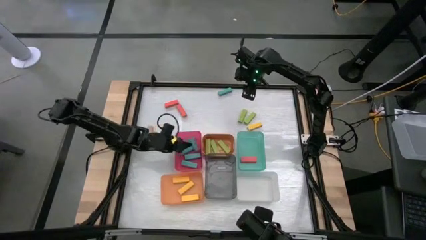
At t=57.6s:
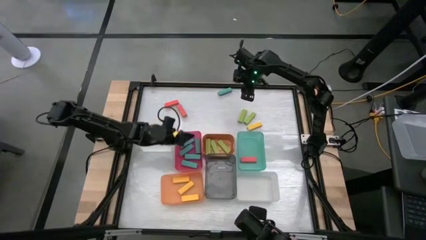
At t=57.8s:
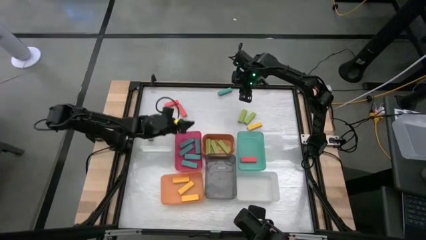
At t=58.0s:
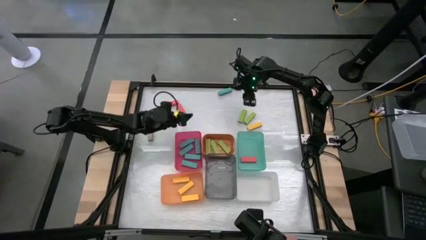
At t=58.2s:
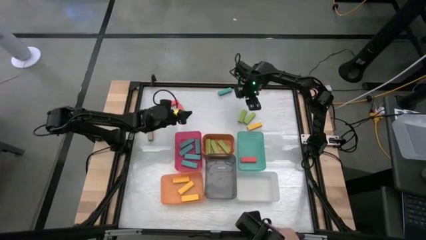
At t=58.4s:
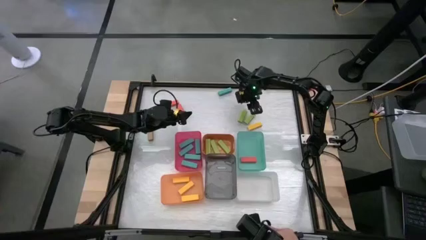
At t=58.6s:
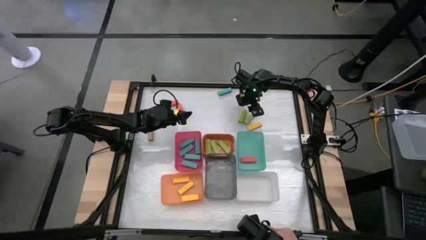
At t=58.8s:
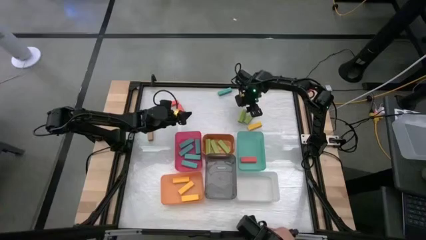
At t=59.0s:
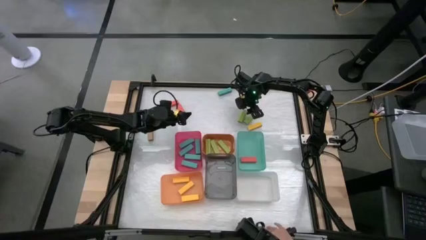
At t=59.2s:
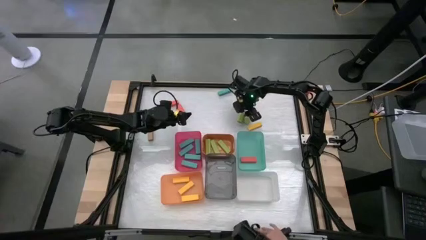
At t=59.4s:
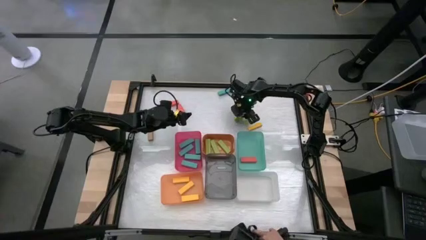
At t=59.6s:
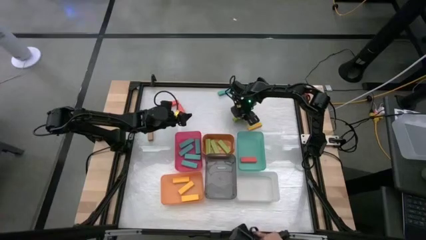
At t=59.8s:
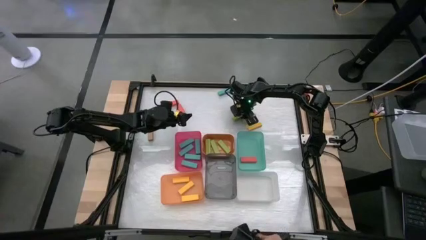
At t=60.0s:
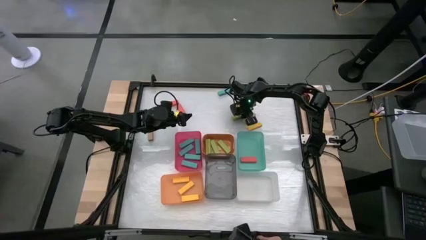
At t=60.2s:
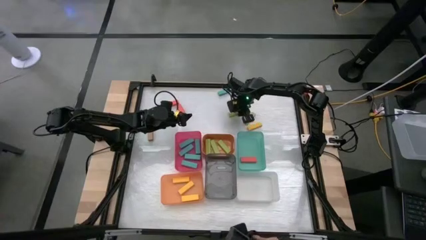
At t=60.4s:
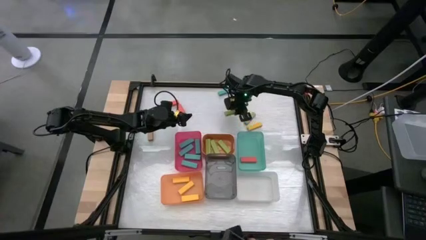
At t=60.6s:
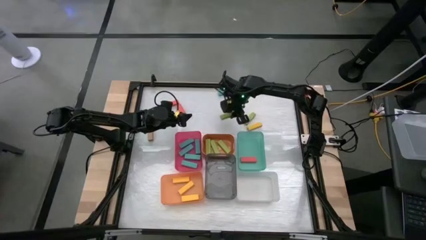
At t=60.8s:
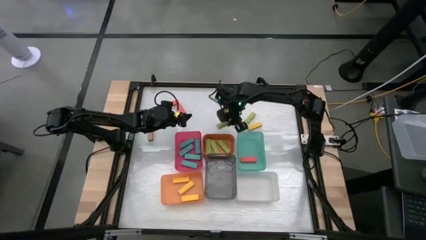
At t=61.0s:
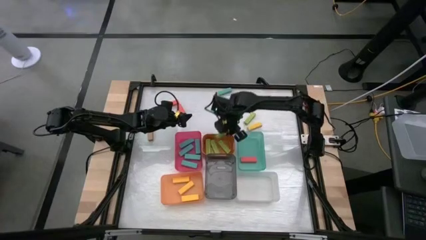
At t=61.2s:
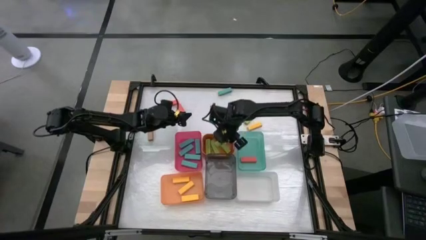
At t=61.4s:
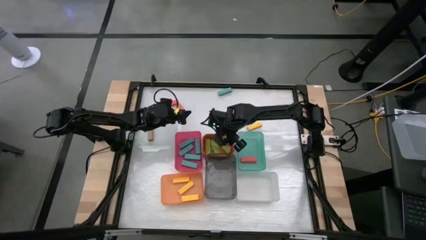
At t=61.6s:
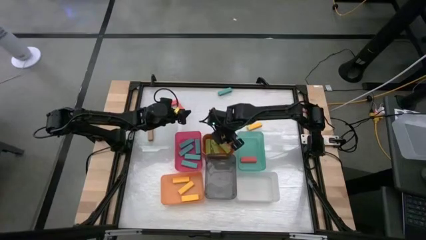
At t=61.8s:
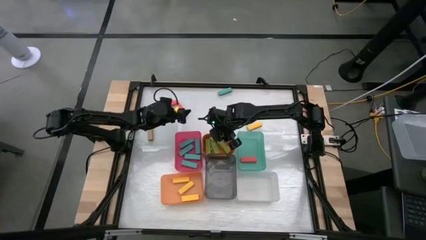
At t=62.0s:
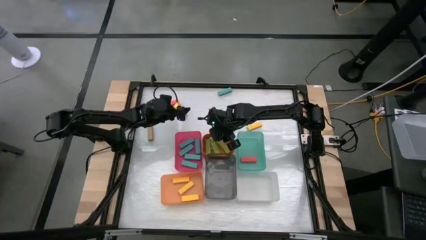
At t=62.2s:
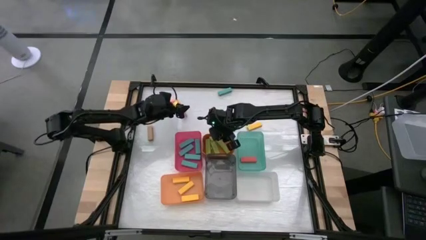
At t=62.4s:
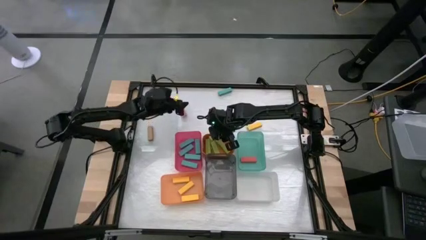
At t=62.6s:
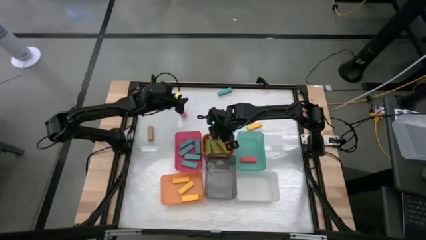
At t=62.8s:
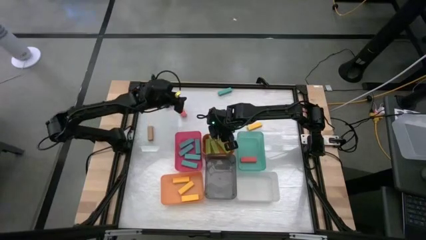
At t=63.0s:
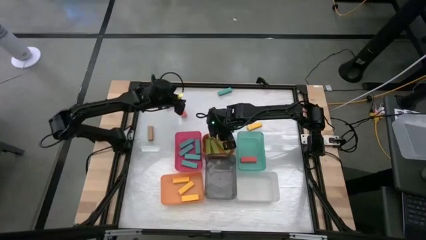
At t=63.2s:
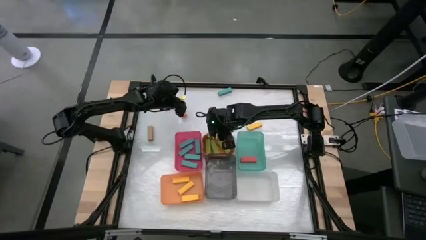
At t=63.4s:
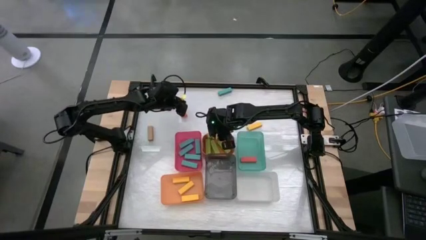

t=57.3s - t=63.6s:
Task: Sort blocks
Put the left green block into the top orange bin

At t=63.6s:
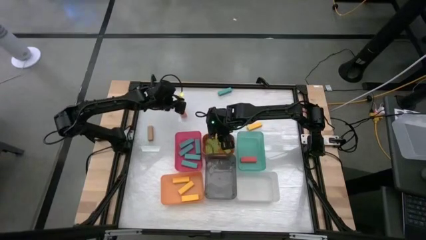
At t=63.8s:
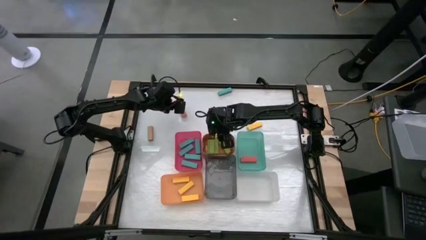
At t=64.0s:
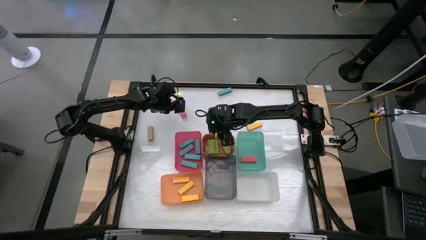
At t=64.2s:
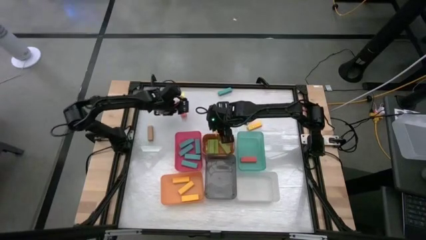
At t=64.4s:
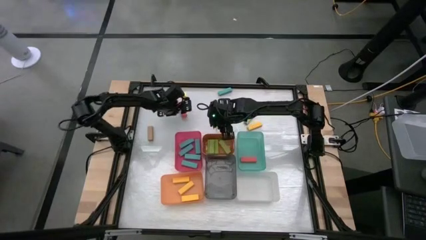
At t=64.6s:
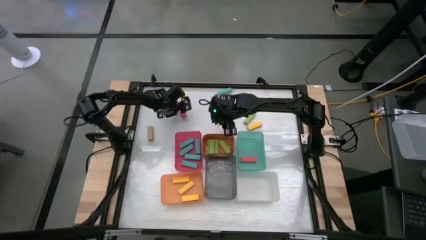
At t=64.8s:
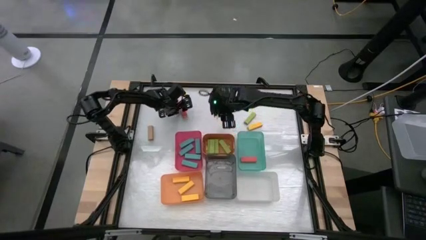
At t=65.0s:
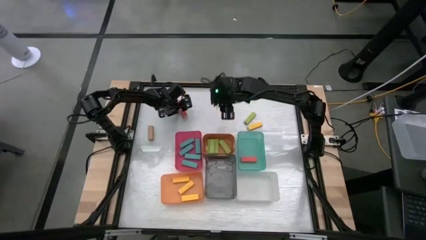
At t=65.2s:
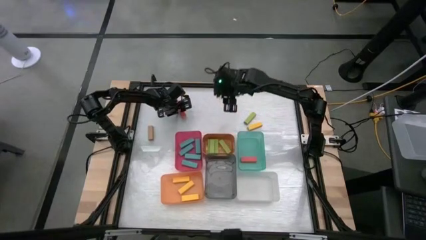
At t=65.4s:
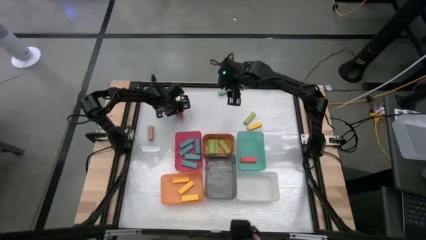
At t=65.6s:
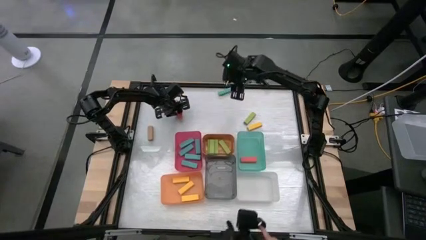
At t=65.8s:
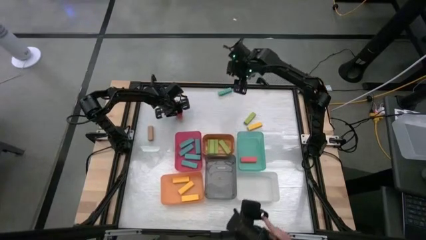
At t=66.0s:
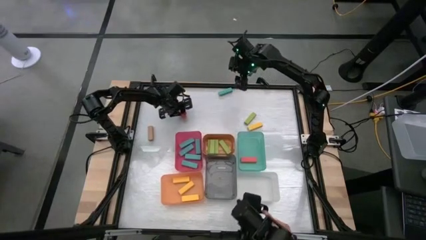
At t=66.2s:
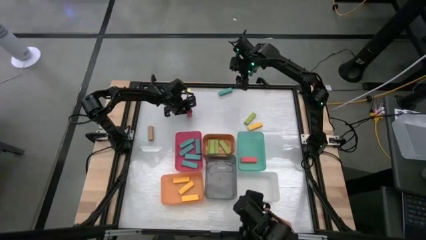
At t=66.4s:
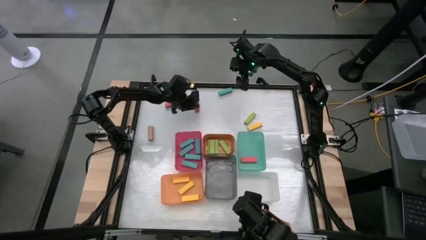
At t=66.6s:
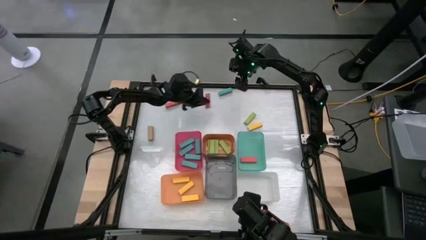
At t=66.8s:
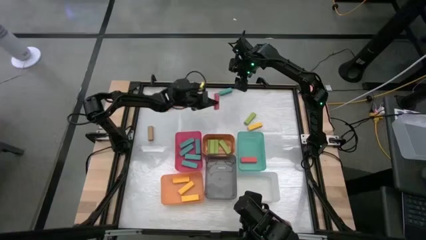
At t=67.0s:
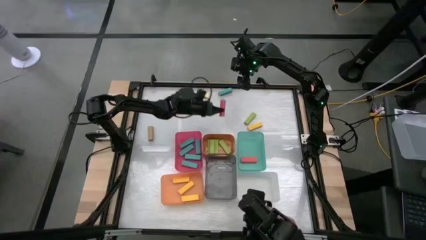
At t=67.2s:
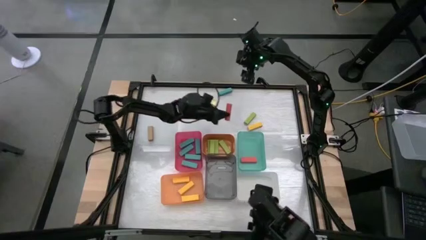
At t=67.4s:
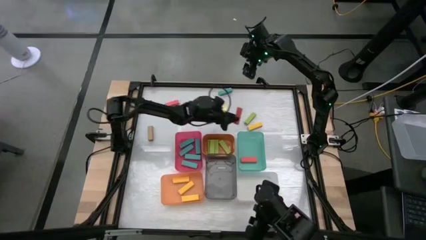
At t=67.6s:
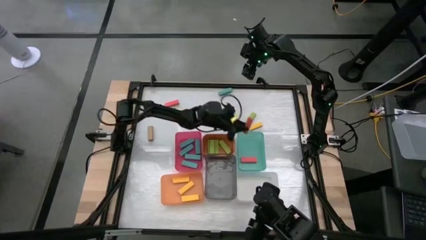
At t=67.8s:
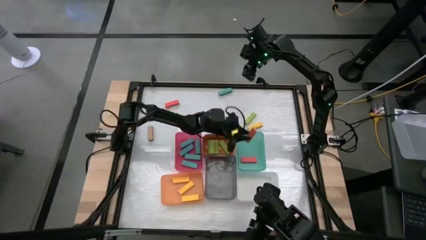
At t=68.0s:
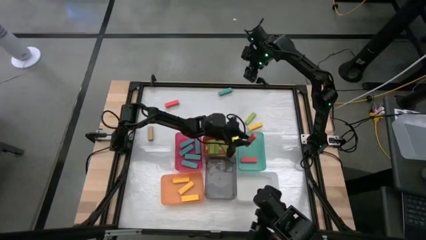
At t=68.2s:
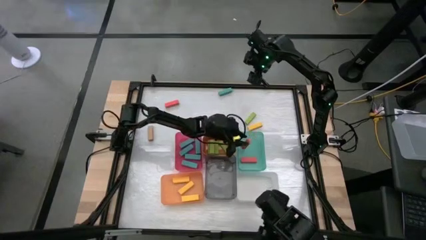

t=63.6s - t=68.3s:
Put the bottom orange block into the green bin

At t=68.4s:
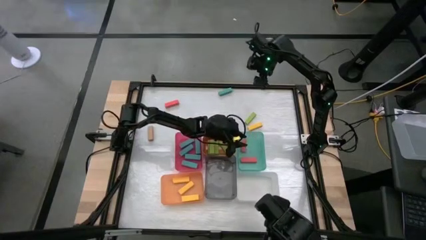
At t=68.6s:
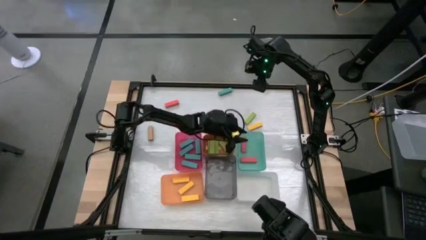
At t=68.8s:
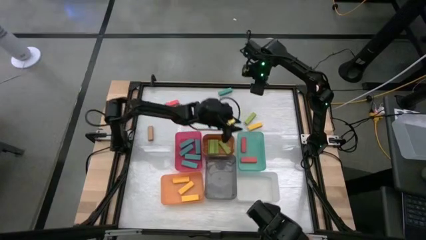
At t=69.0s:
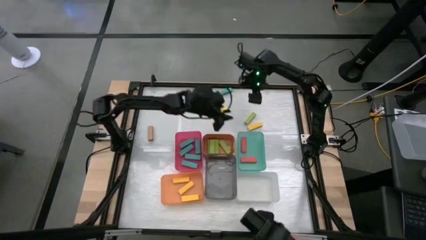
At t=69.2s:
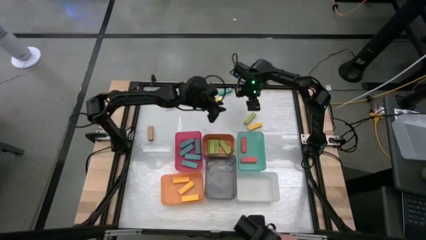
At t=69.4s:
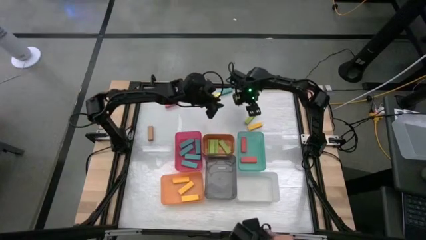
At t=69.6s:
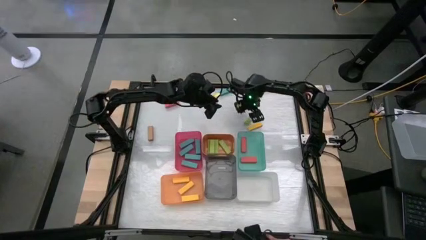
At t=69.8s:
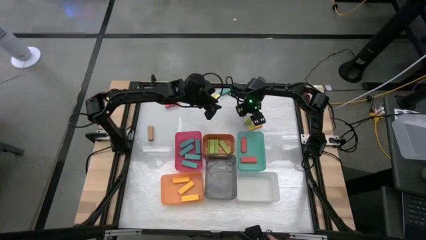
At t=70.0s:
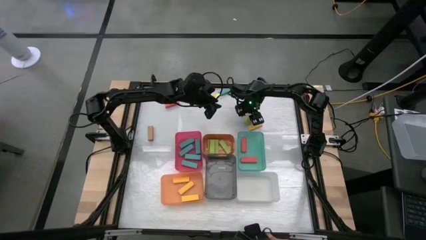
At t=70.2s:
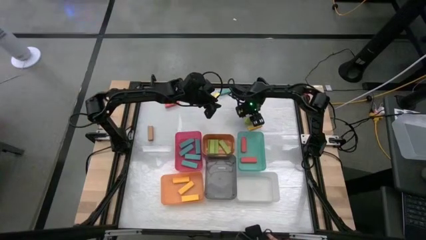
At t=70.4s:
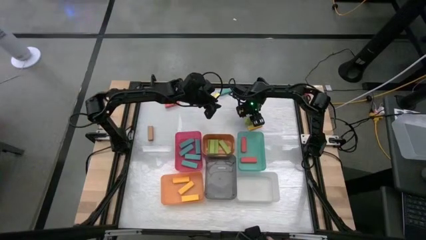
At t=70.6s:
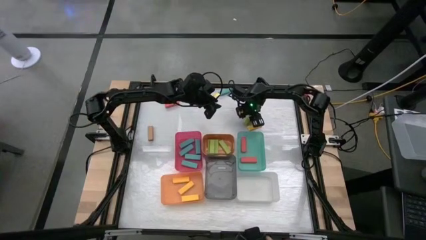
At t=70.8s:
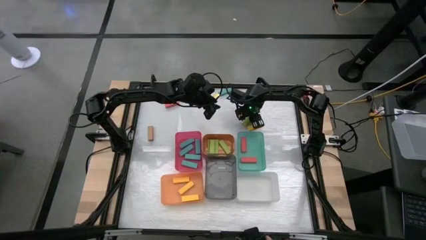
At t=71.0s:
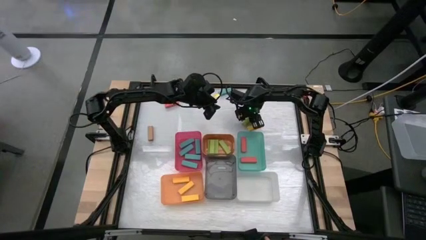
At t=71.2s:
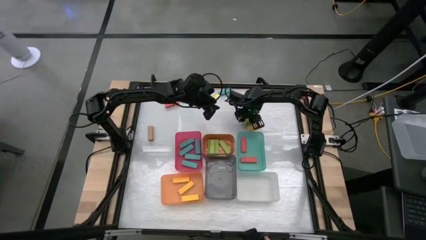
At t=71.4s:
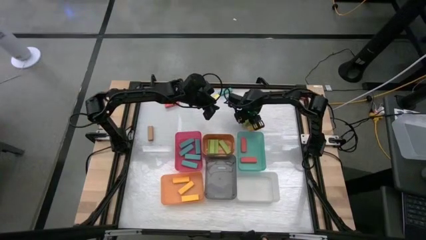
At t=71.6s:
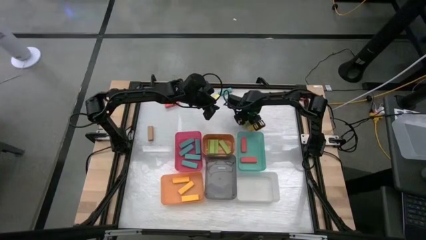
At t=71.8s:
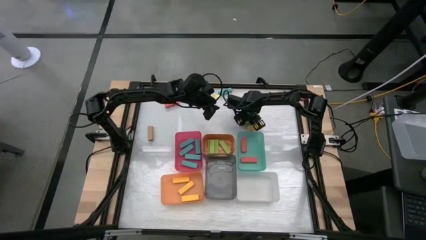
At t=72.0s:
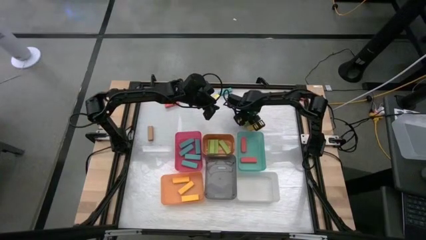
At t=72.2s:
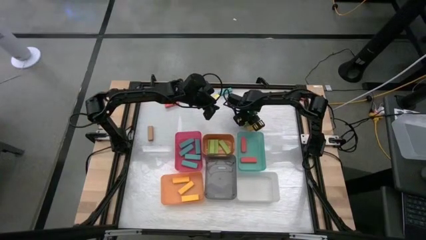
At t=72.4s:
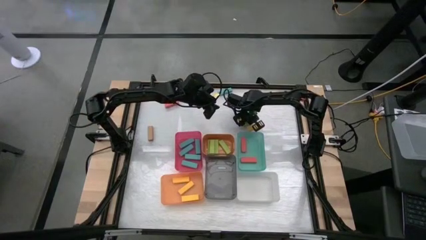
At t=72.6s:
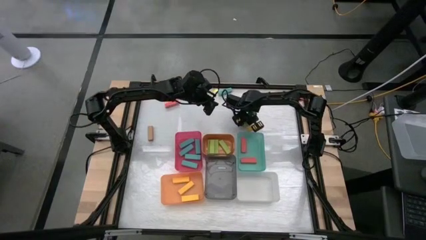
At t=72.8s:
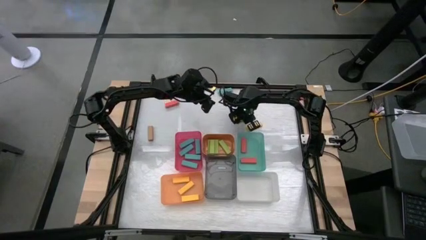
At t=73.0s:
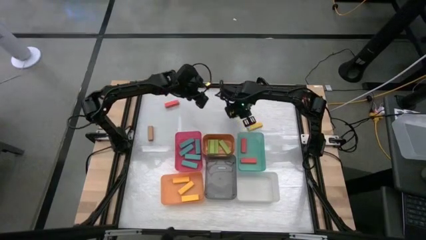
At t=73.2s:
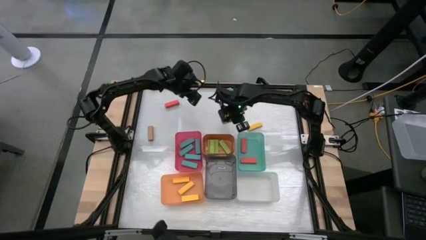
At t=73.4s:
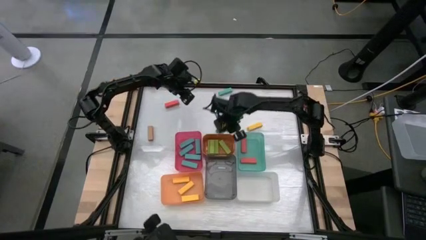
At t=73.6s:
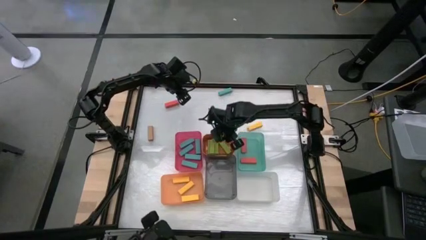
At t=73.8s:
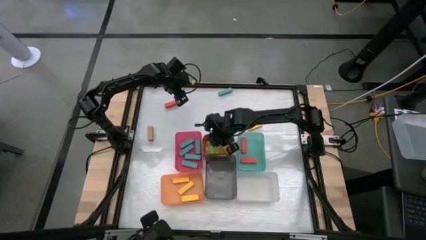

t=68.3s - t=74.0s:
Put the green block into the top orange bin

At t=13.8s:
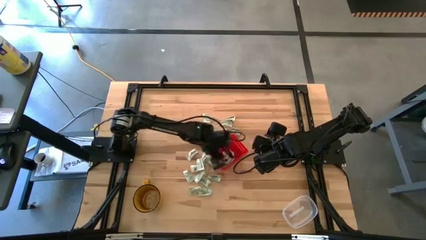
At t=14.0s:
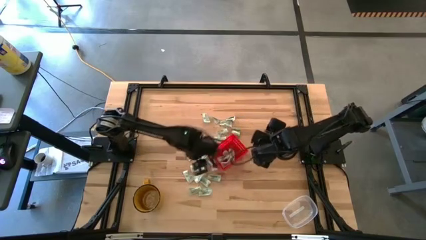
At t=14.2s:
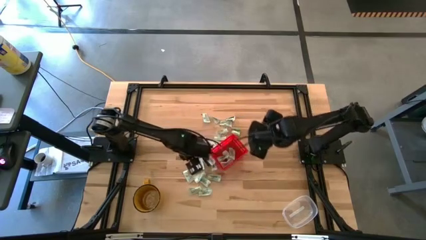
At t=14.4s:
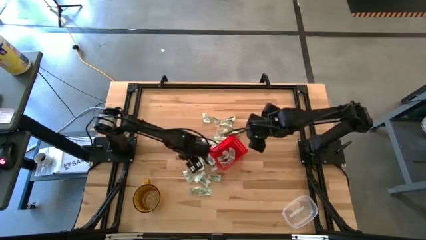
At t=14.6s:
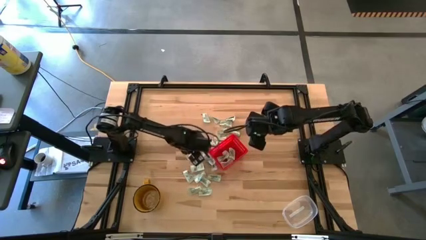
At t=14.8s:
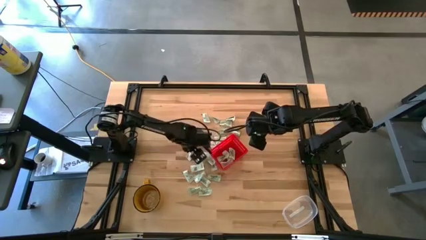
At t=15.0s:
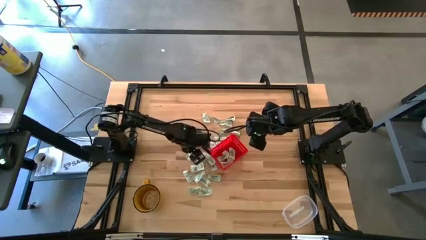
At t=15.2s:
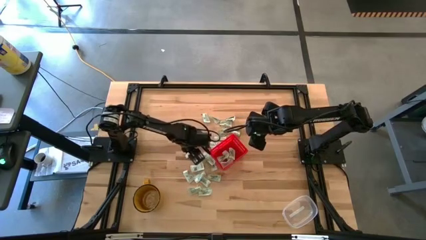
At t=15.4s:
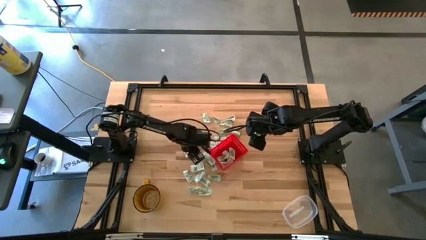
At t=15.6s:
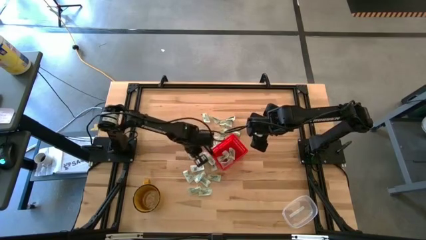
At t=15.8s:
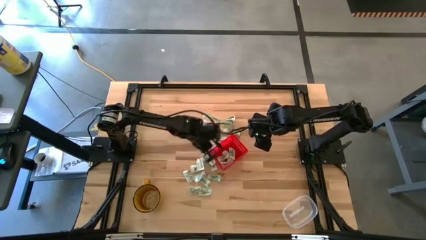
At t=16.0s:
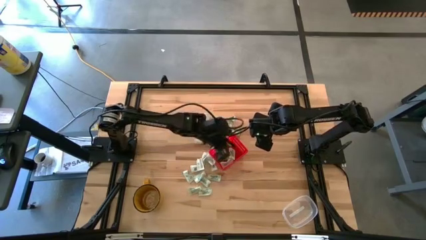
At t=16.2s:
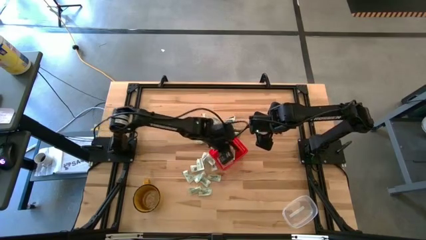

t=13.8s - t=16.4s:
Task: Pick and place items into bin
Put the light green stevia packet into the red bin
